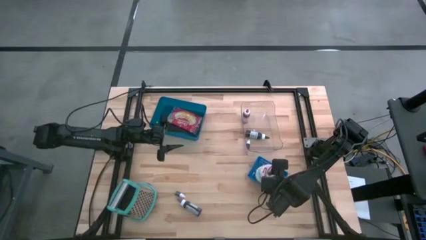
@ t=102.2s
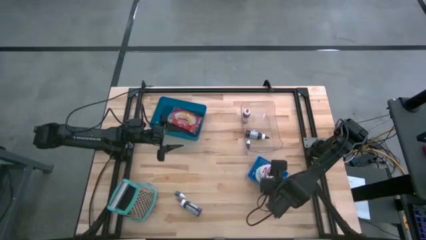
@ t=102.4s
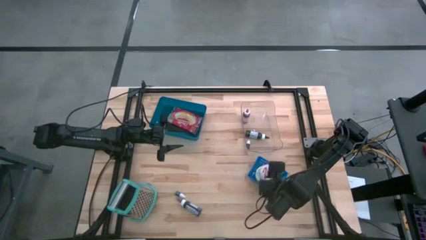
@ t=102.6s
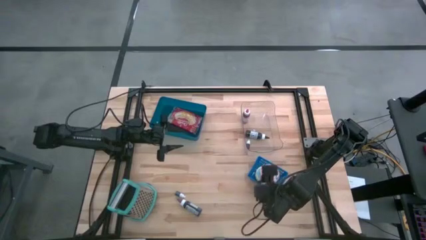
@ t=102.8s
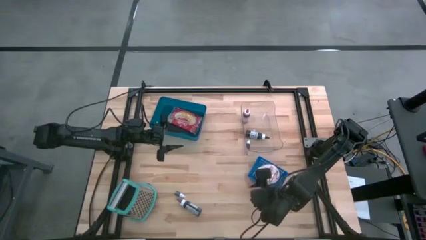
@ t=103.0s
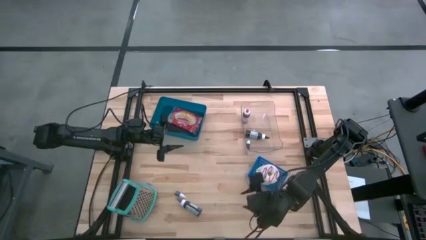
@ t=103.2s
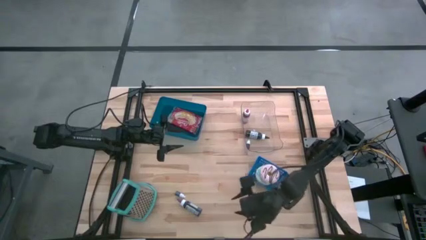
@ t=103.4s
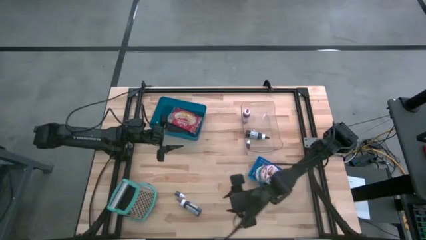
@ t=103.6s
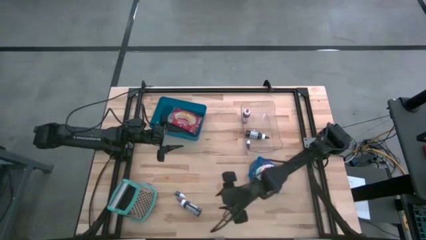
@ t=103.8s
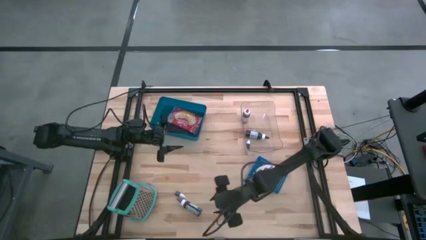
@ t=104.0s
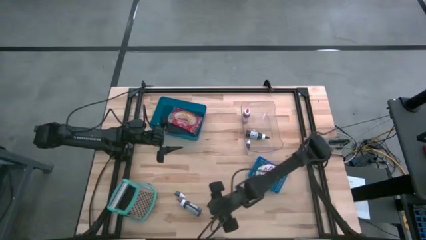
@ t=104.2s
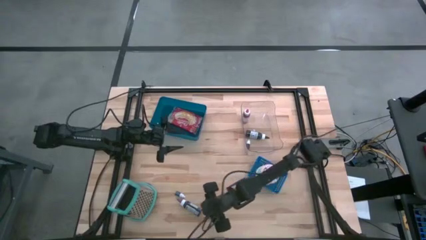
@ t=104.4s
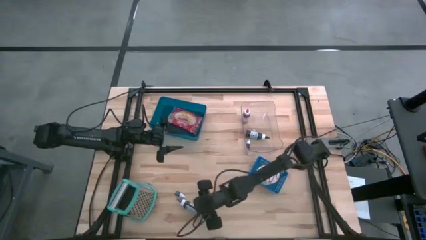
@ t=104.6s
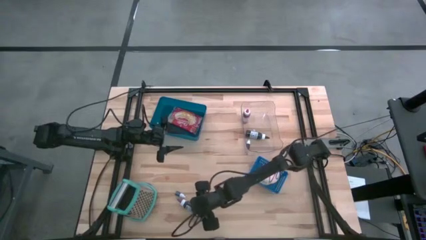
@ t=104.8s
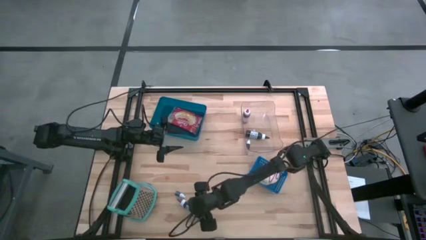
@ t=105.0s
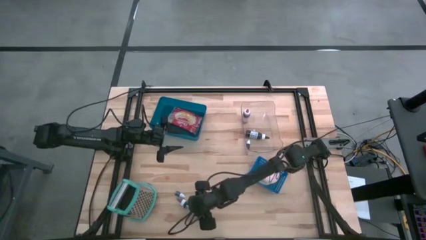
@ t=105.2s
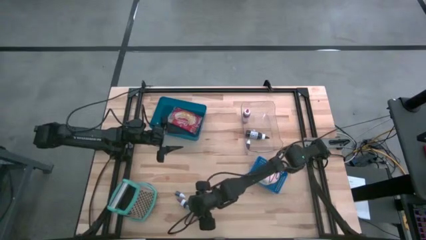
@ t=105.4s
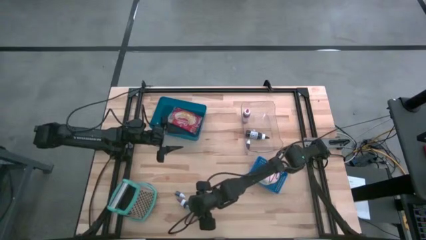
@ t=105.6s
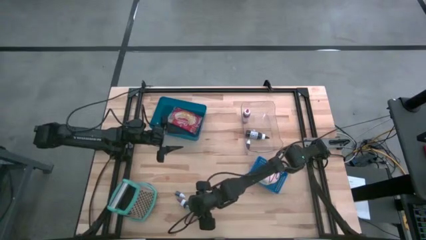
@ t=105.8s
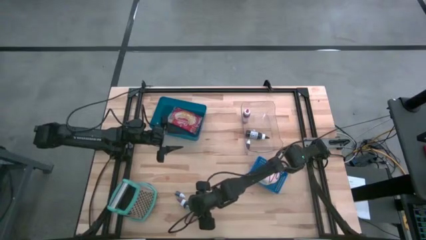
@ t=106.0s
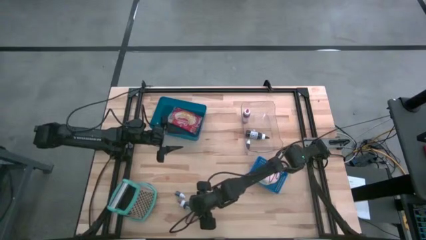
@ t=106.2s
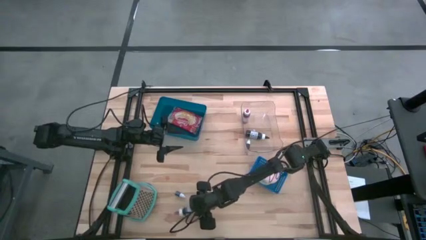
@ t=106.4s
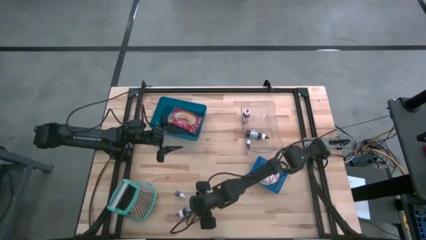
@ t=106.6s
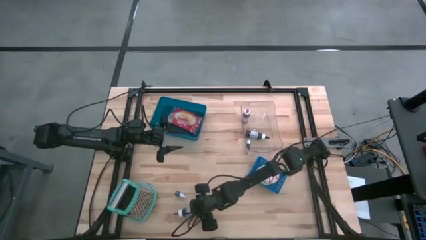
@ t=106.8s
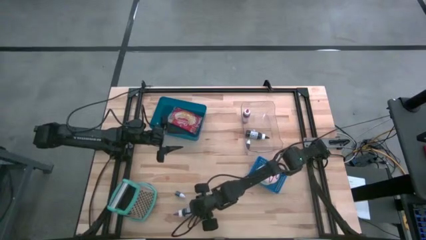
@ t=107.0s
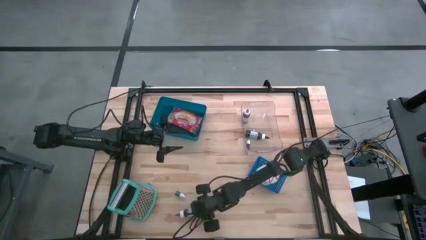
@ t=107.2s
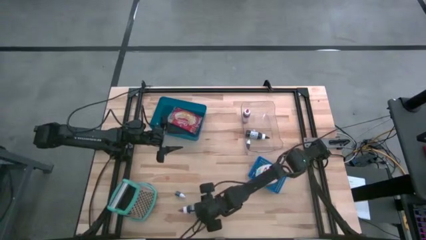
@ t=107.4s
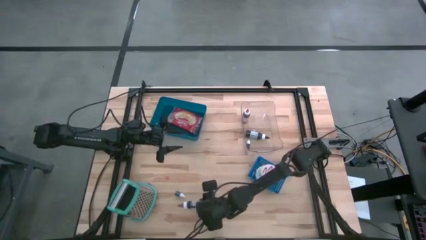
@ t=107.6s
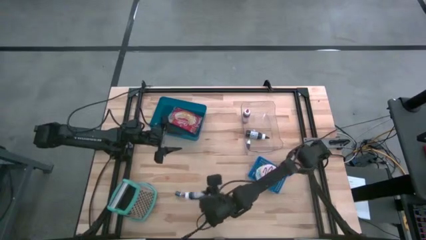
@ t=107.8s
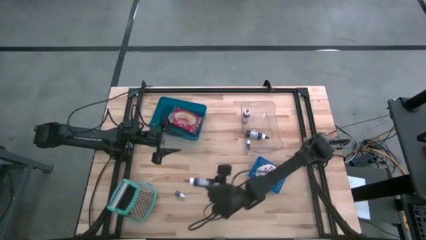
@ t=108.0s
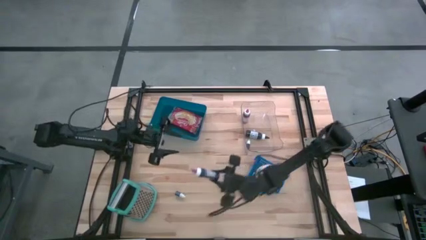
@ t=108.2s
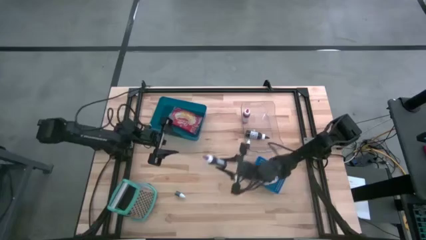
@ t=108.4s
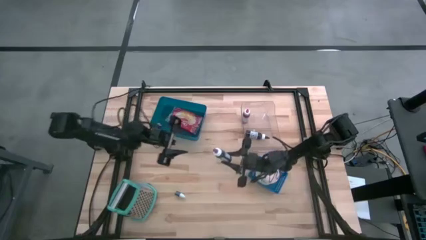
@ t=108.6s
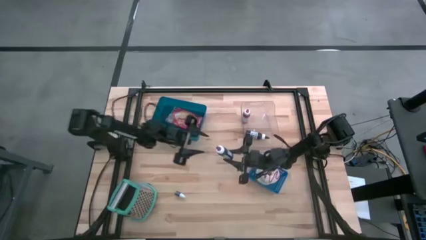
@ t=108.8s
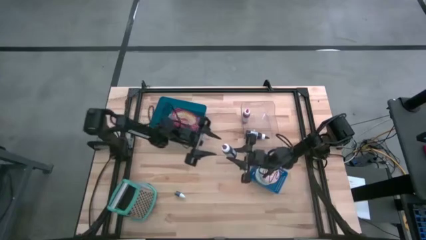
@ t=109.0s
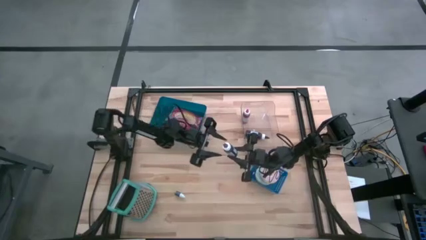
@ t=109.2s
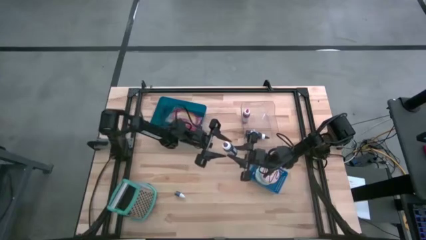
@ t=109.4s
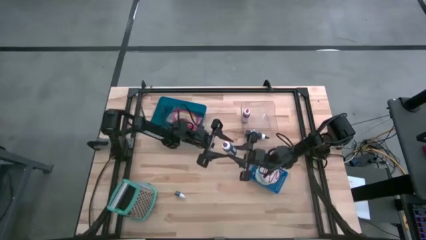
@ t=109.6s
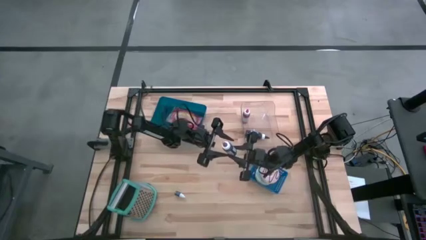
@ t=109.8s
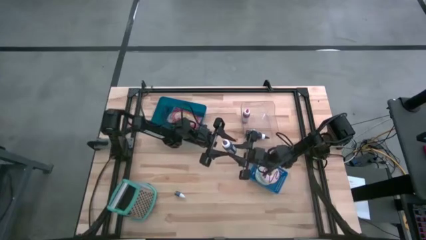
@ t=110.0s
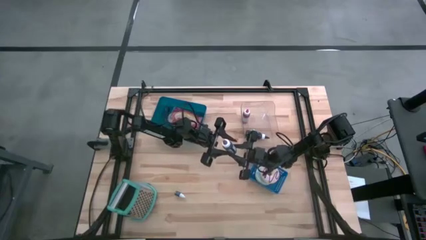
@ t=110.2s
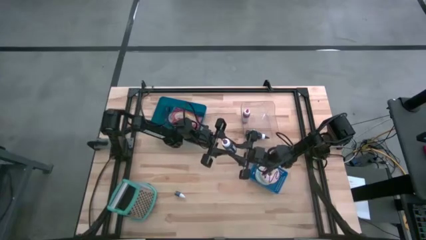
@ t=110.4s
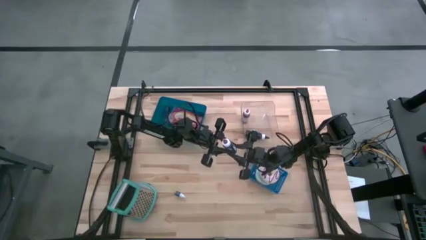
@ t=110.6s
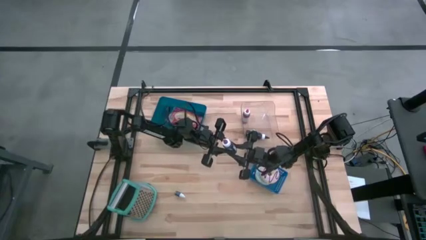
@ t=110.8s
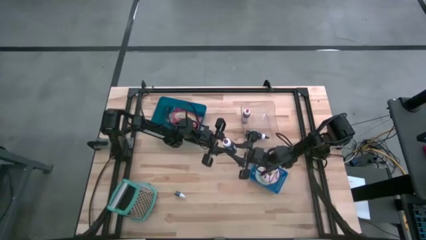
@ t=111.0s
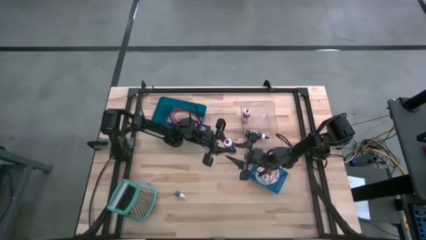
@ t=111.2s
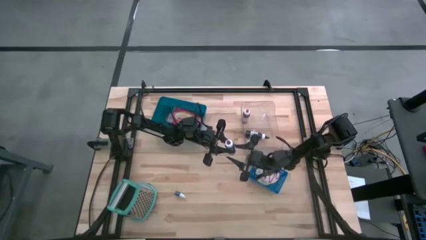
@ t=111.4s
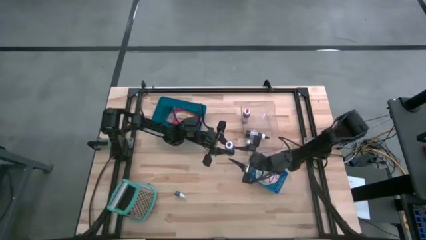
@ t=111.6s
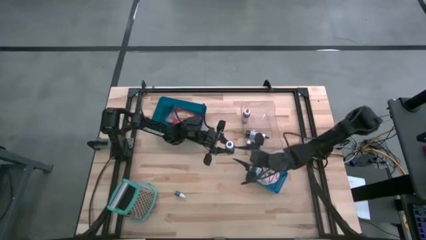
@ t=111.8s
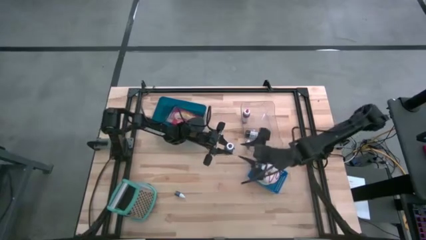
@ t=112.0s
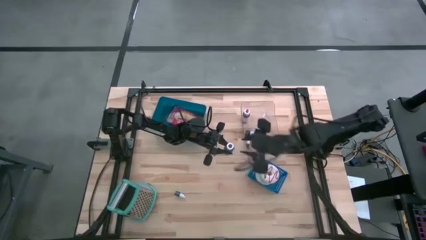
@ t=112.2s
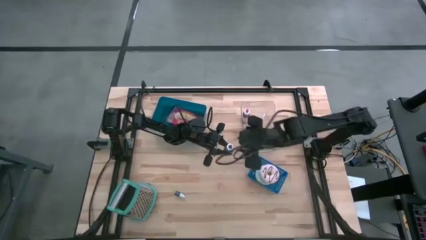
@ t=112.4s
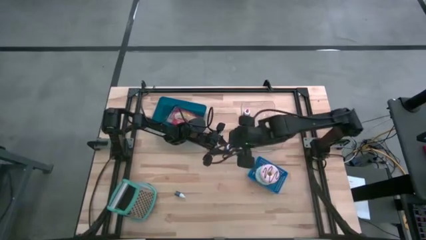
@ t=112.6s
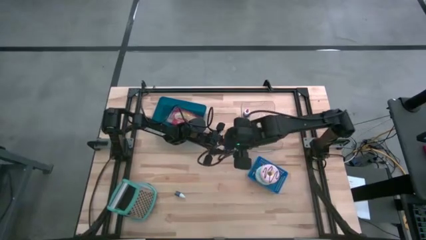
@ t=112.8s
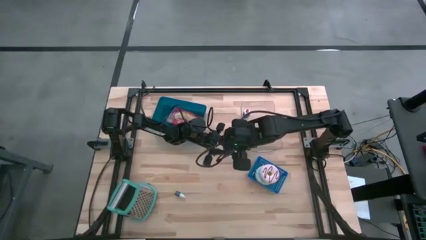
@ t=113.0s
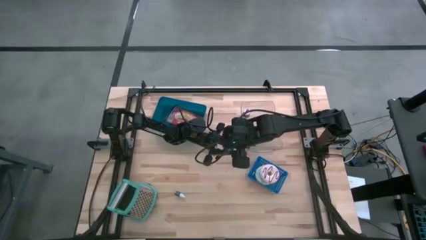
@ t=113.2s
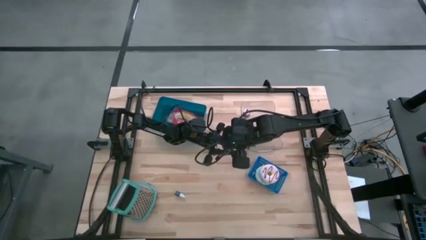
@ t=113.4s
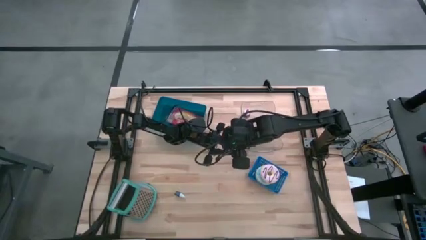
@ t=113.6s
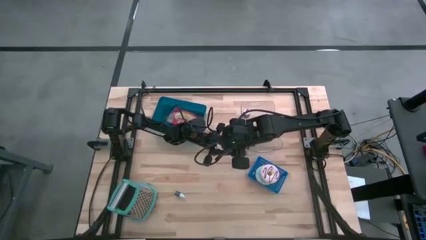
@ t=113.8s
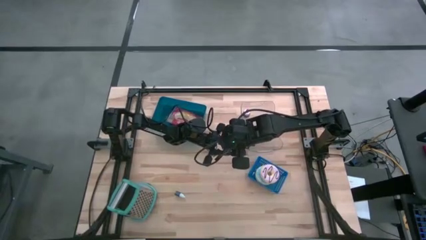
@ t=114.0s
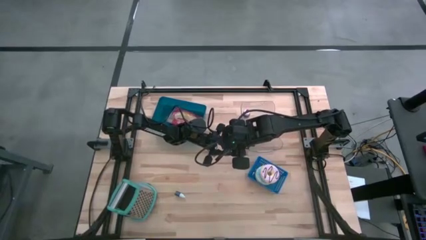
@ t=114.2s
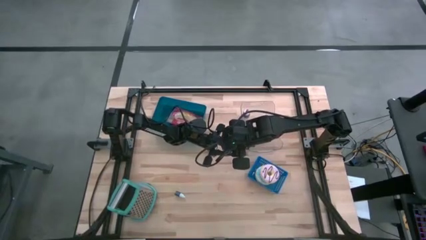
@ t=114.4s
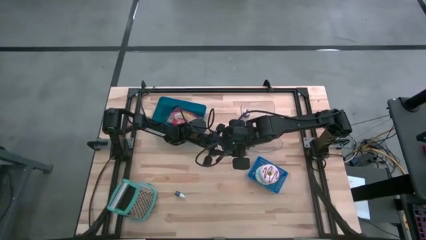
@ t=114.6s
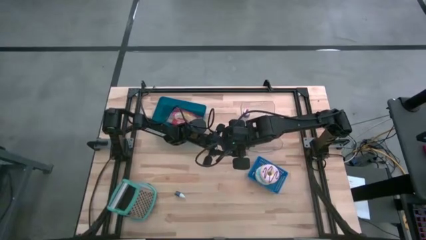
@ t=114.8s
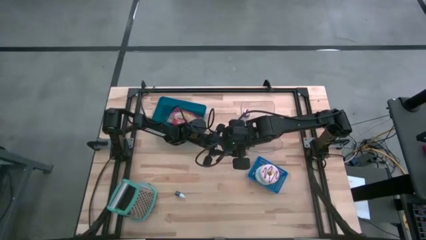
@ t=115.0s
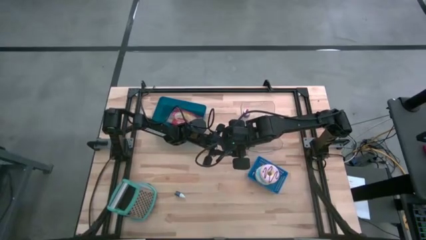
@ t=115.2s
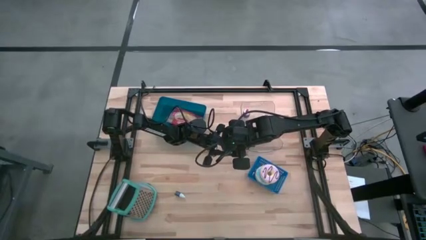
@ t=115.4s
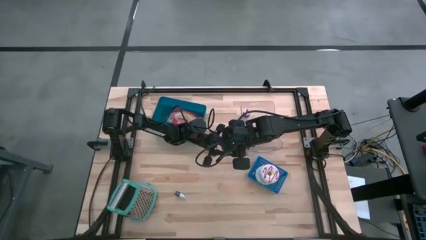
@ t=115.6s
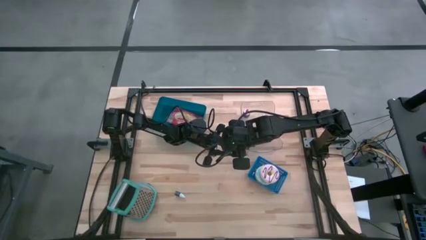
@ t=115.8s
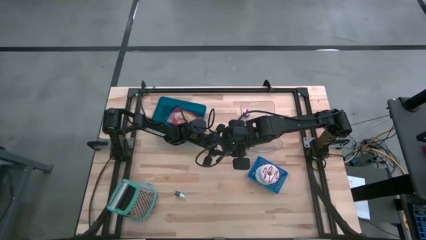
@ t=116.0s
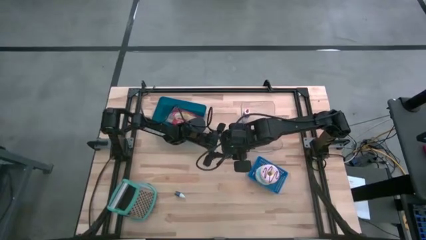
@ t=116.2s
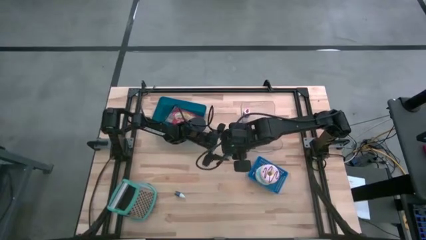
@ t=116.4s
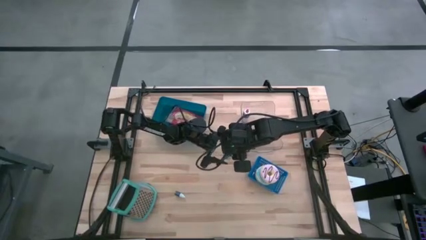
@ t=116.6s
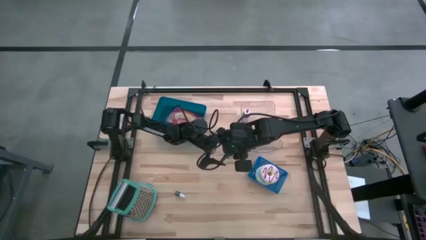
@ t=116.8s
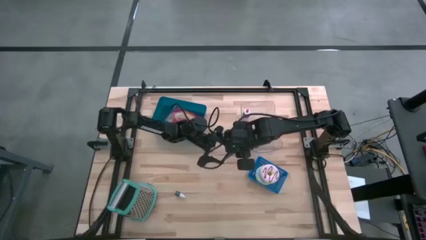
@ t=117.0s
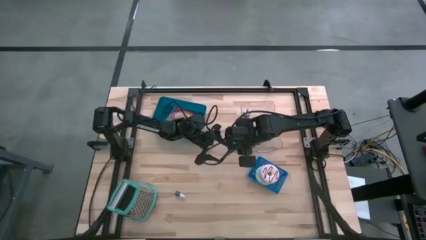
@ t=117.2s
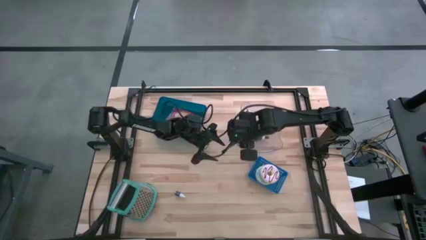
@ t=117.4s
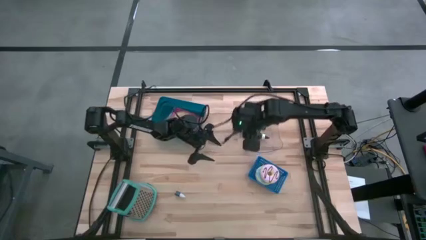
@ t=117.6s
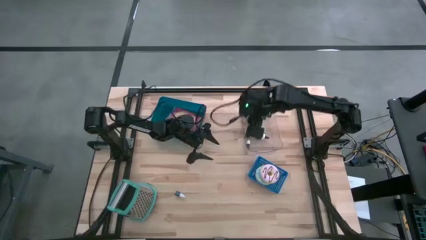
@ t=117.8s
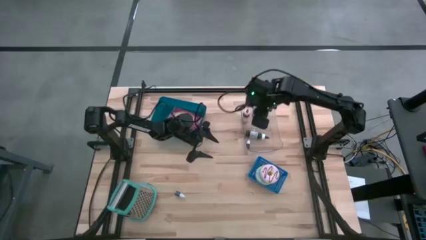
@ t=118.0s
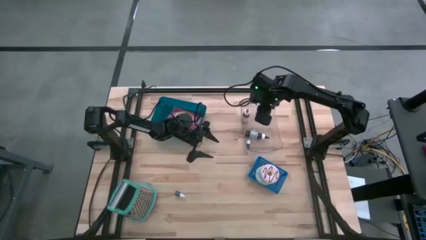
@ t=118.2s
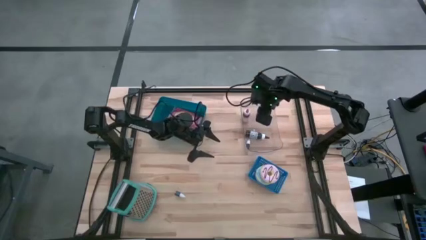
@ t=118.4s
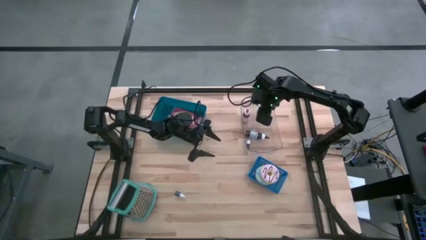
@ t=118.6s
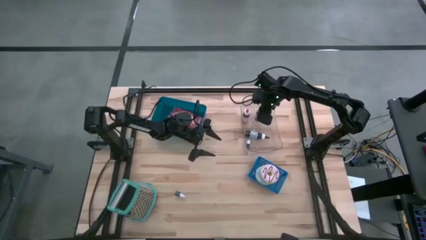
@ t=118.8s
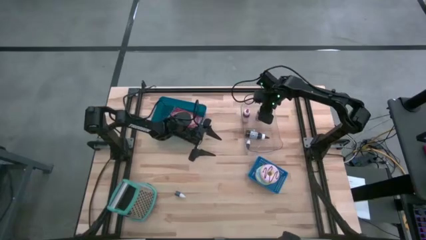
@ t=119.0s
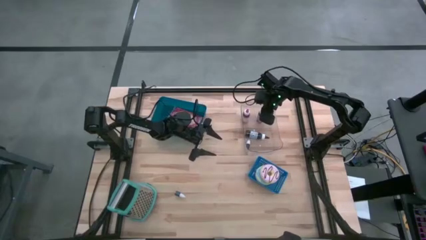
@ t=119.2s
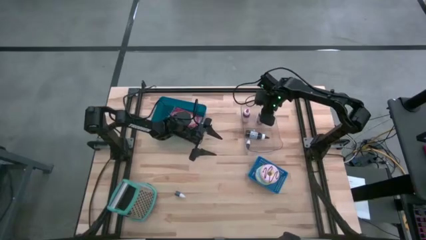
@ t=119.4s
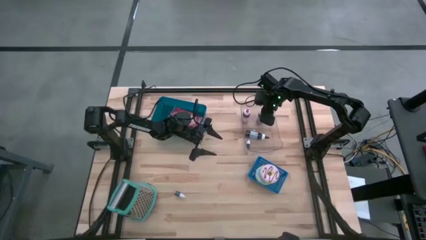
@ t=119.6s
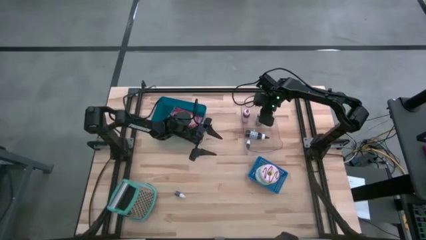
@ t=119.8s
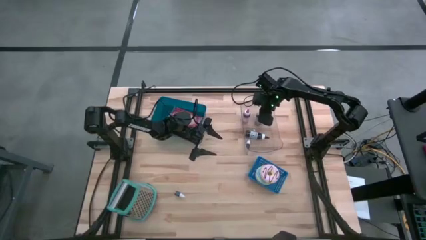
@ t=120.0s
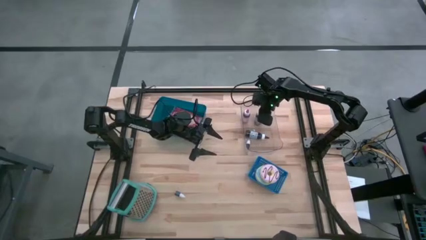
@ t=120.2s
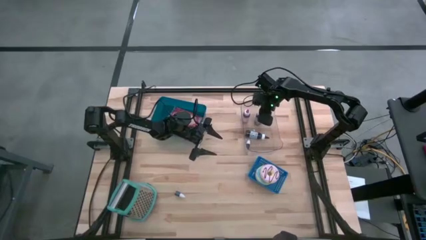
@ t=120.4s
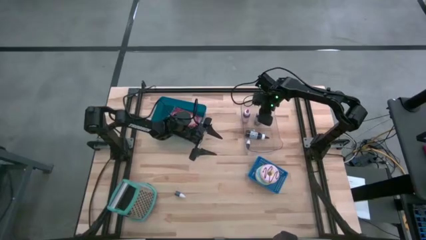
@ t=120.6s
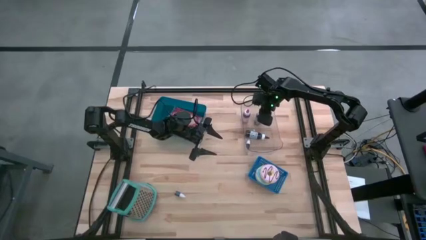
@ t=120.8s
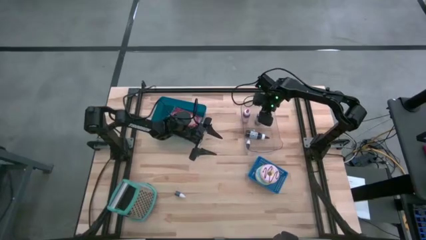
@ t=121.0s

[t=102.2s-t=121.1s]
Task: Pick & Place Food Item
Put the large purple food coloring bottle into the transparent bin
